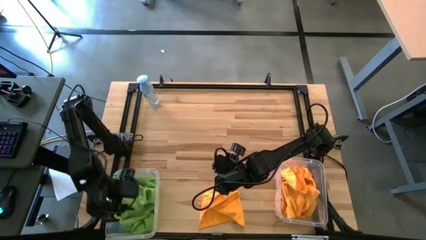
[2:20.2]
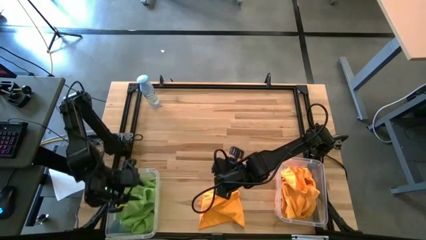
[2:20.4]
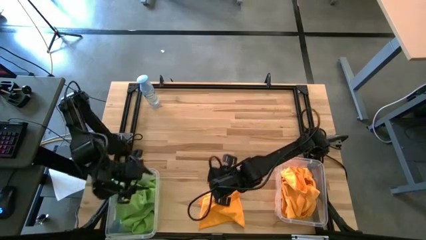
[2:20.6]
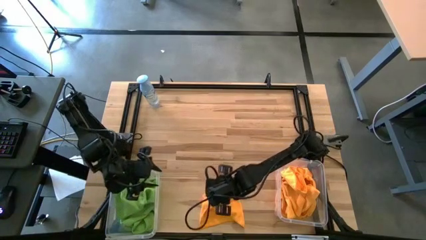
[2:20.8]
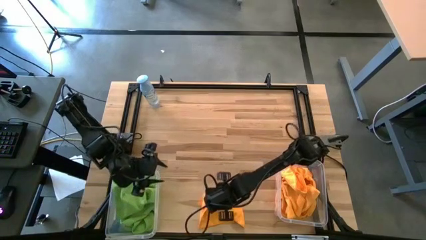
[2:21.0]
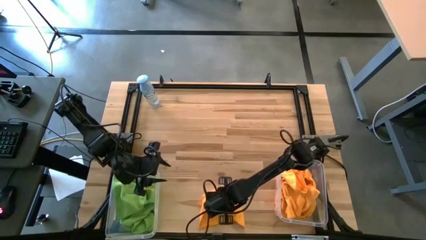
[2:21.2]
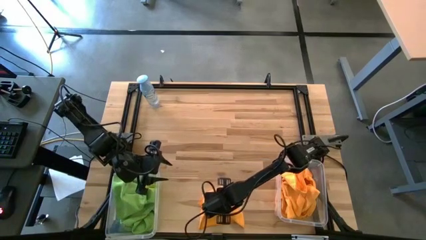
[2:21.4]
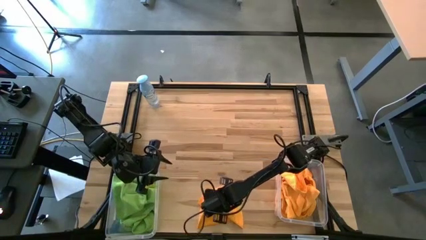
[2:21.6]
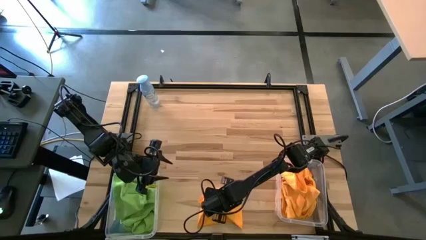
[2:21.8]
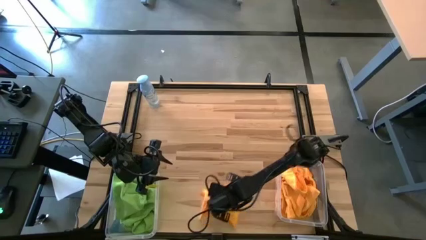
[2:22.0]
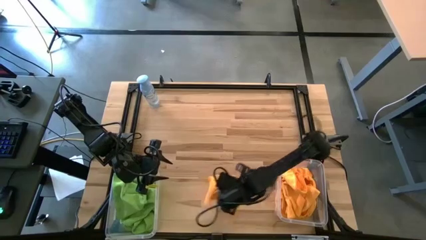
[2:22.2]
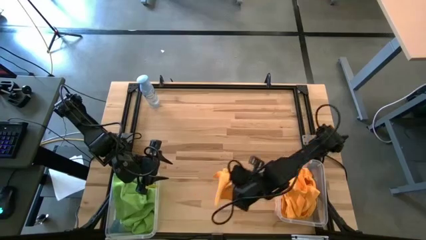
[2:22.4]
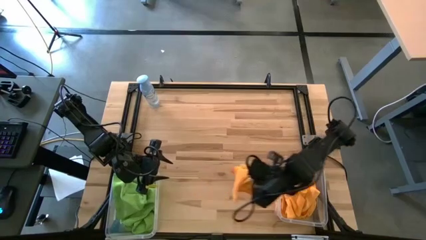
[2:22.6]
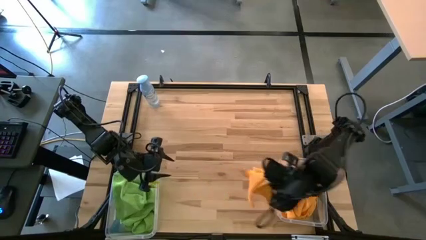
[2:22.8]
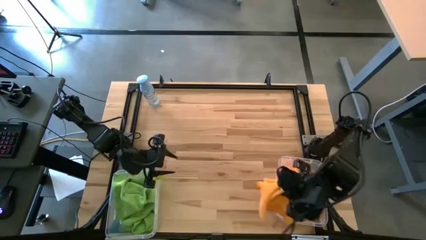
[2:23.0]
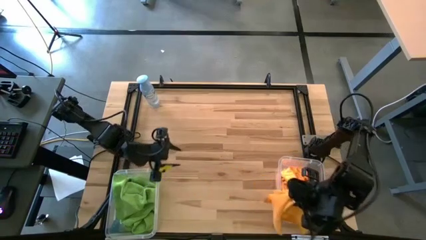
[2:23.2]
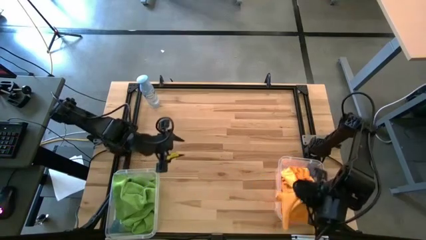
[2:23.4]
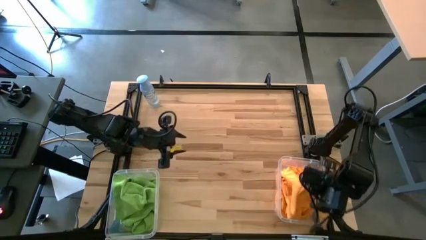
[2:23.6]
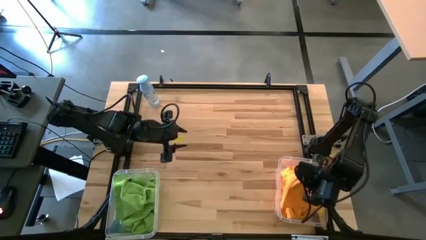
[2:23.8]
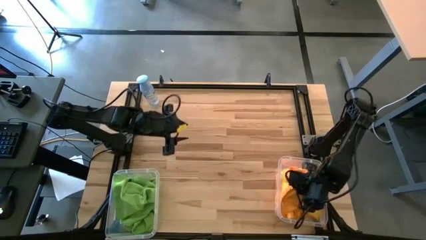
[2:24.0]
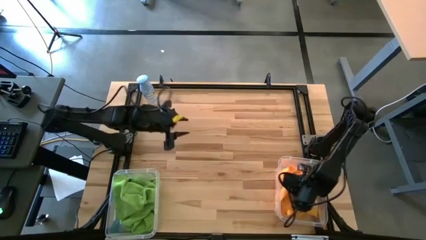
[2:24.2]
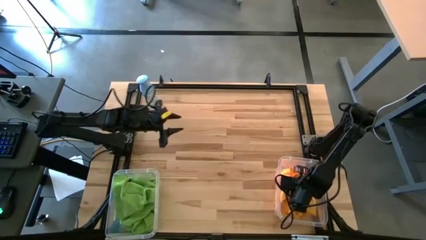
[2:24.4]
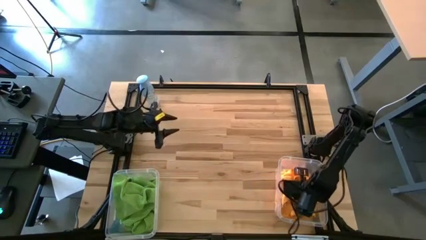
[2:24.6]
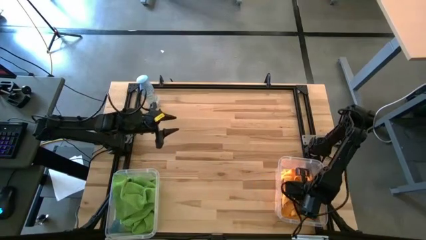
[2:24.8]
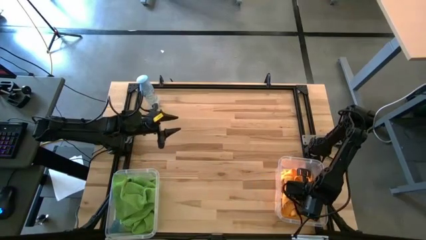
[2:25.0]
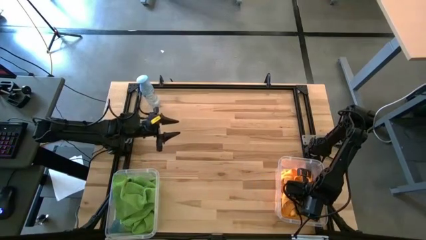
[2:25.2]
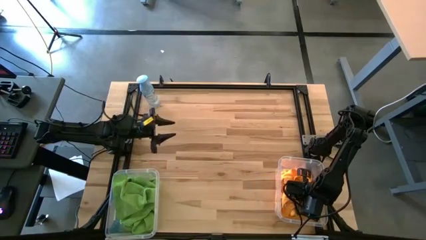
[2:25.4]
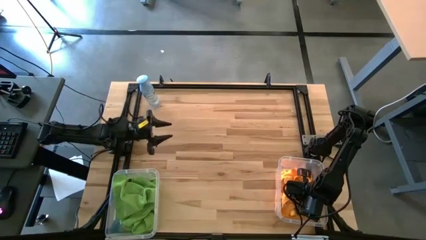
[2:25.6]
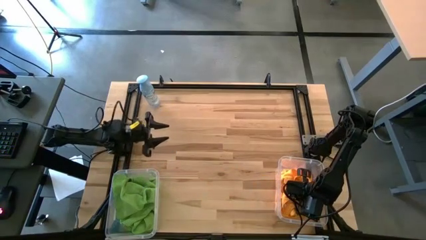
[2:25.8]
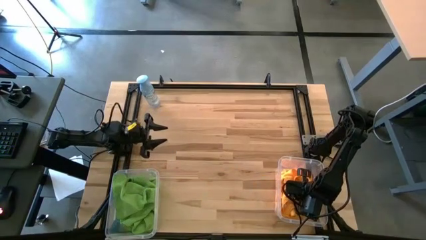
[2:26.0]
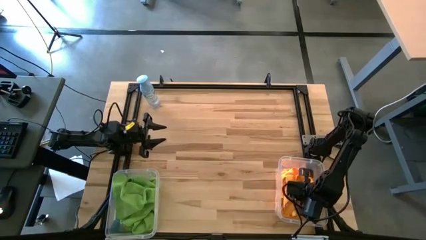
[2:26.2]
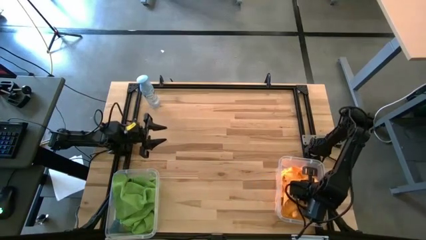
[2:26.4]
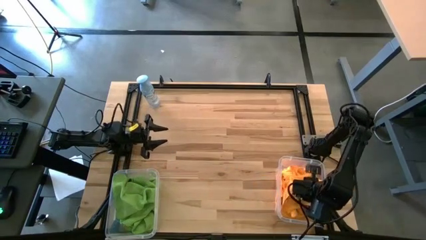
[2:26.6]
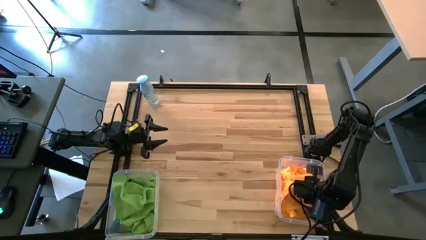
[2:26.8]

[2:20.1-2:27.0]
Task: Sort microfiber towel by color & place in baskets
Put the yellow towel into the right transparent bin

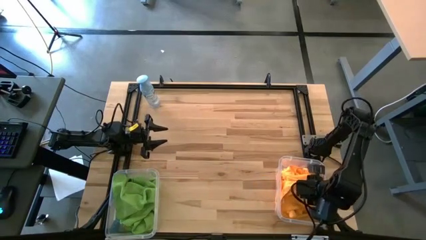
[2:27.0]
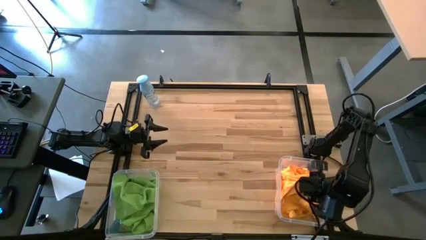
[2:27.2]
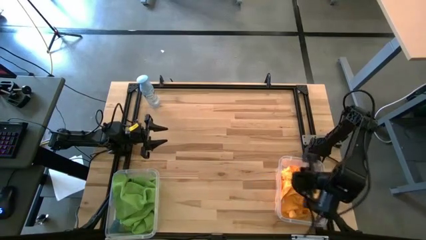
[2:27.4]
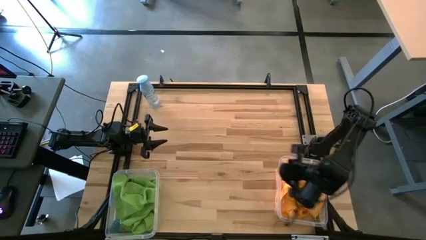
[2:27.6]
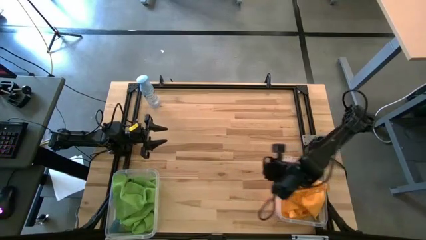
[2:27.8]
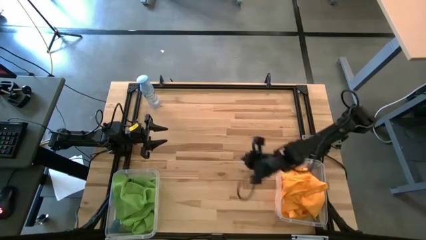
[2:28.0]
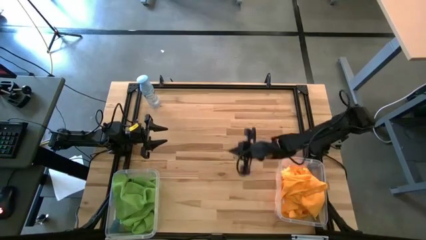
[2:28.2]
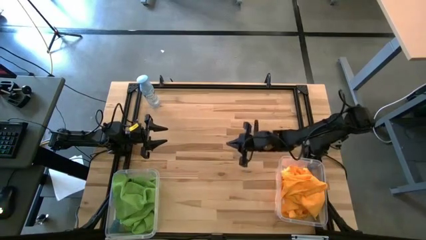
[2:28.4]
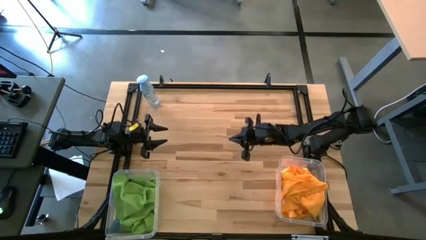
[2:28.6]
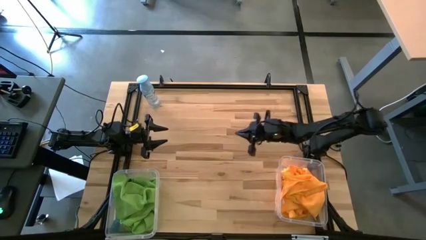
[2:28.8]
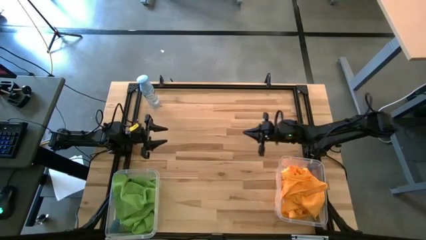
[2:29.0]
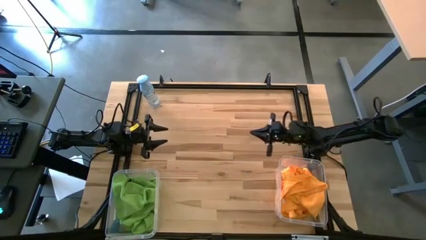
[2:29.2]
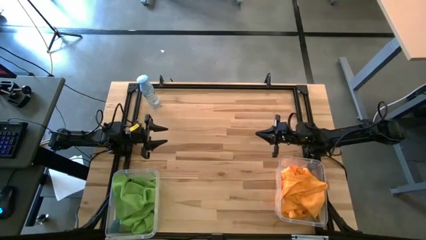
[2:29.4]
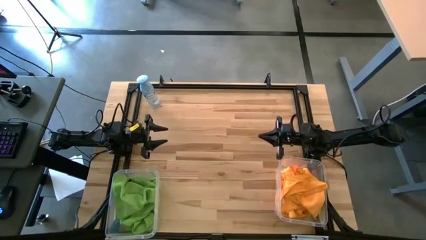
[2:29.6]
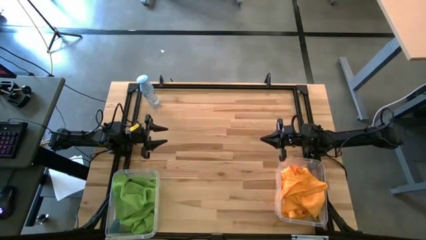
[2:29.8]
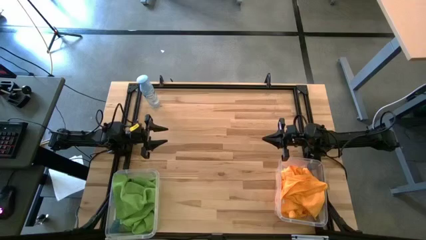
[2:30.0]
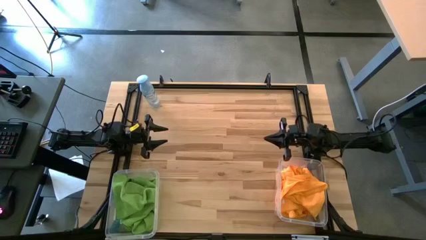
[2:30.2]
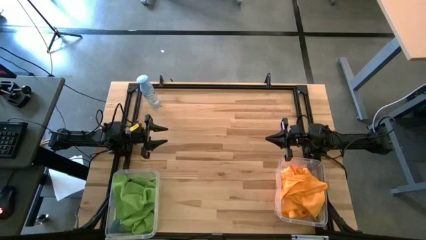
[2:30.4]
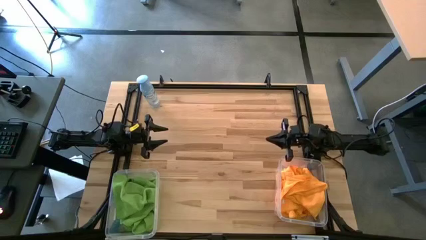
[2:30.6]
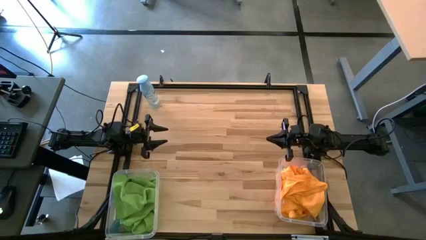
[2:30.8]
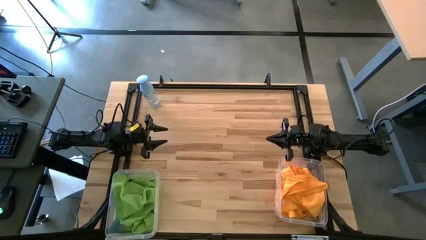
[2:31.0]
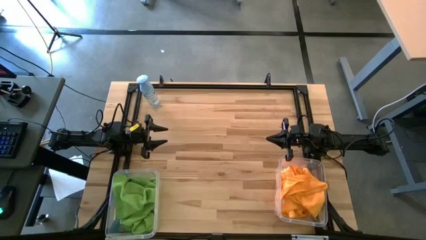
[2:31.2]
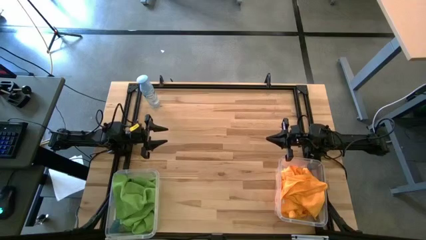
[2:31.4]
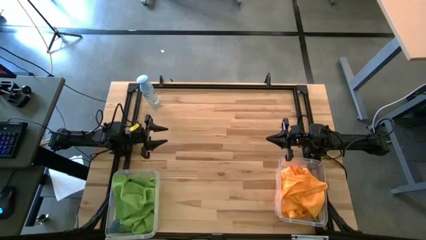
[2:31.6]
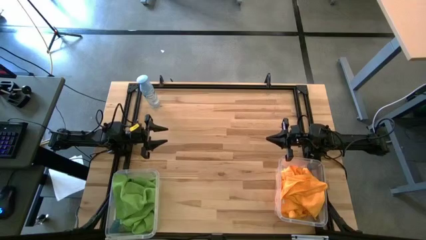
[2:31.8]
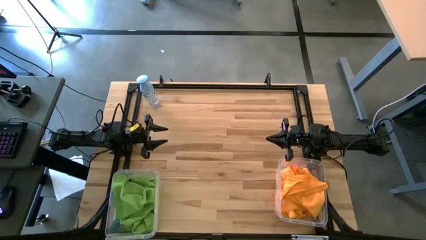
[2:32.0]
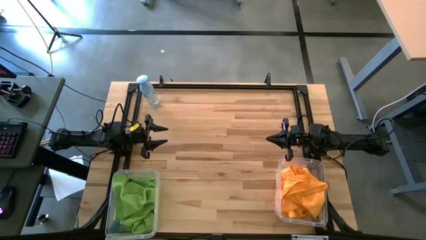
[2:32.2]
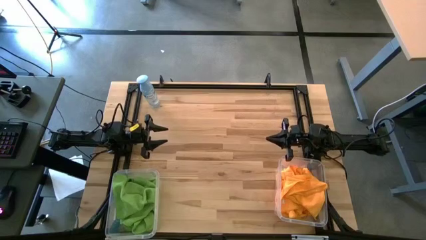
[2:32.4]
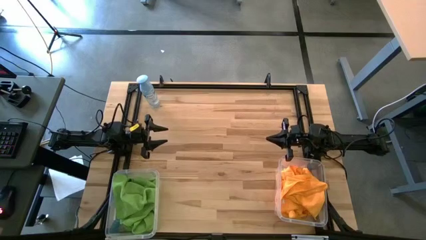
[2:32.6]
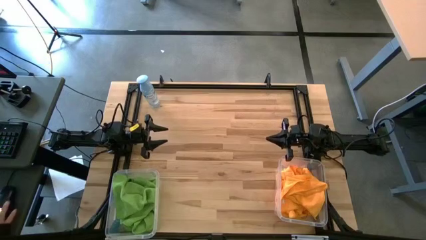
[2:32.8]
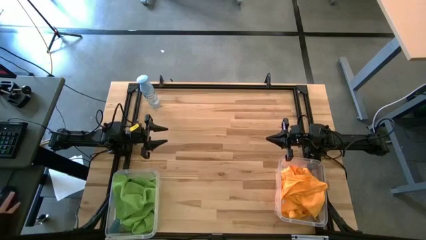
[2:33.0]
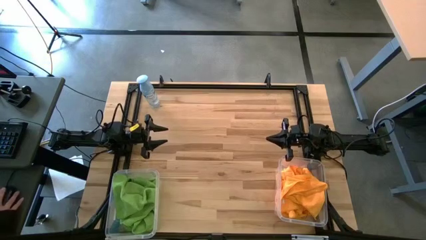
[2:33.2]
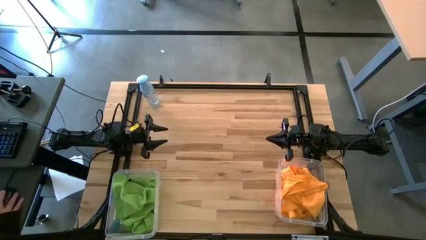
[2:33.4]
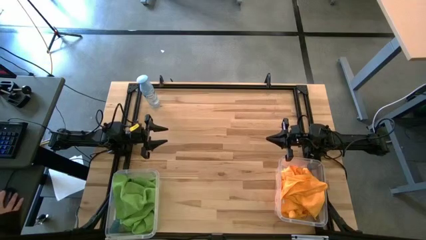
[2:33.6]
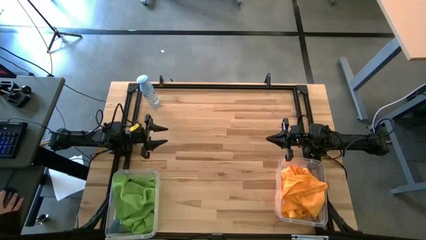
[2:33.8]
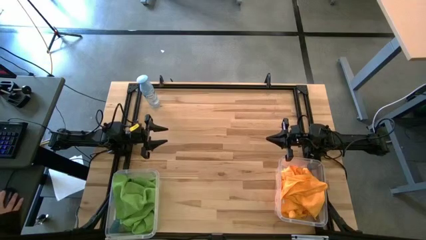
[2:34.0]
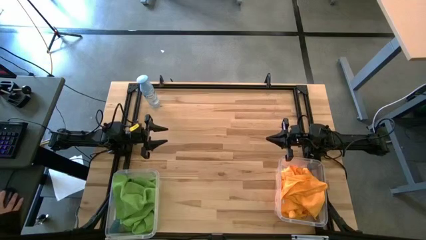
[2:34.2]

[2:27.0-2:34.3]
Return to Home Position
